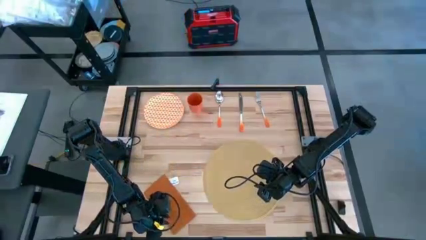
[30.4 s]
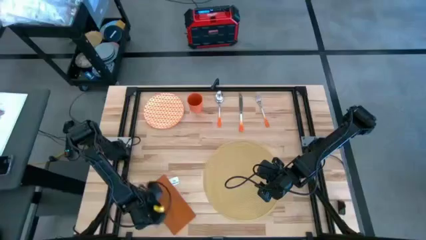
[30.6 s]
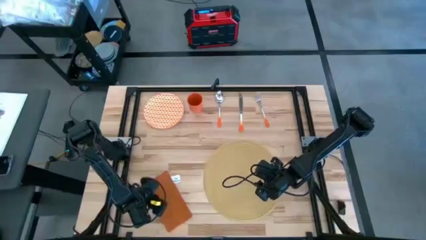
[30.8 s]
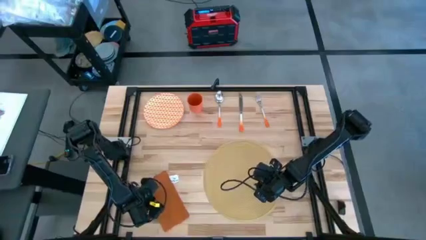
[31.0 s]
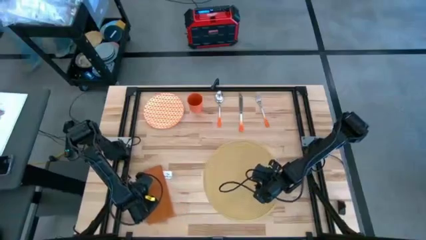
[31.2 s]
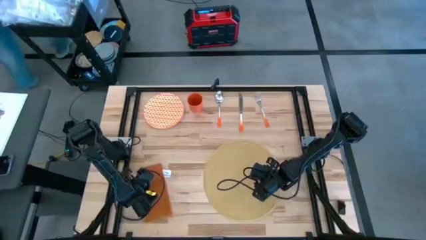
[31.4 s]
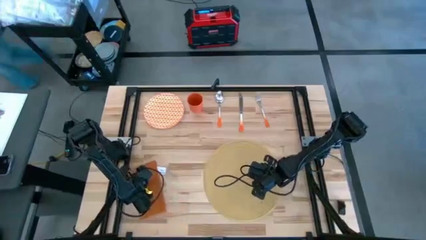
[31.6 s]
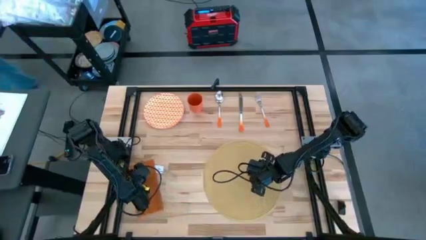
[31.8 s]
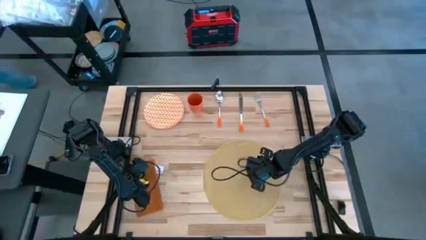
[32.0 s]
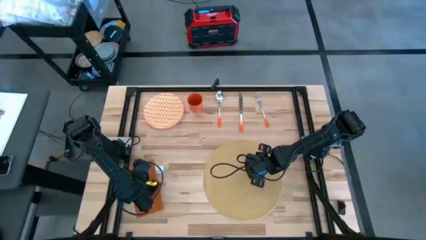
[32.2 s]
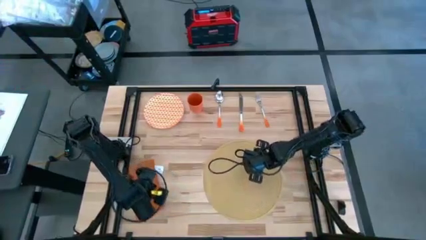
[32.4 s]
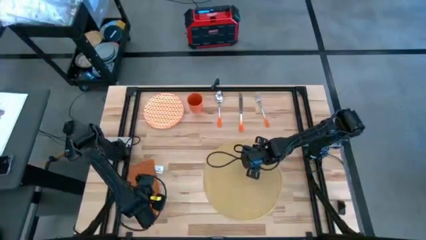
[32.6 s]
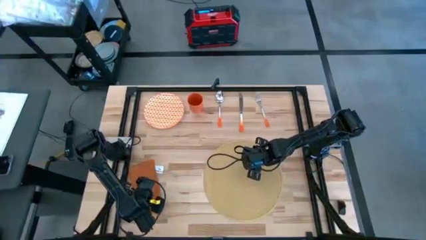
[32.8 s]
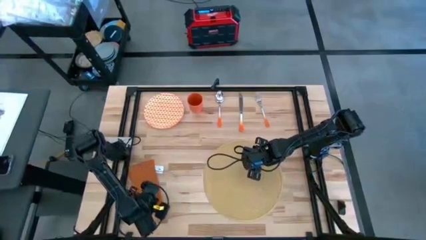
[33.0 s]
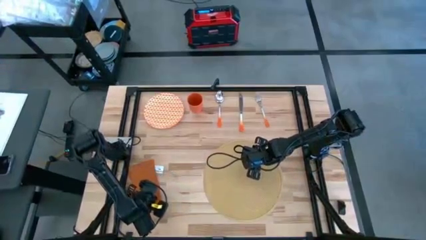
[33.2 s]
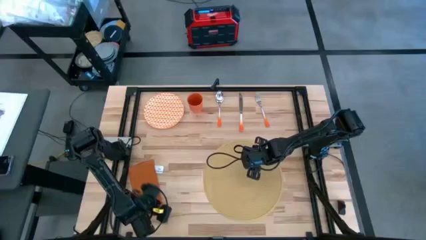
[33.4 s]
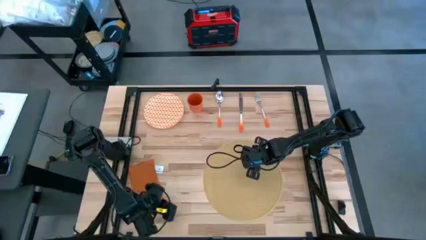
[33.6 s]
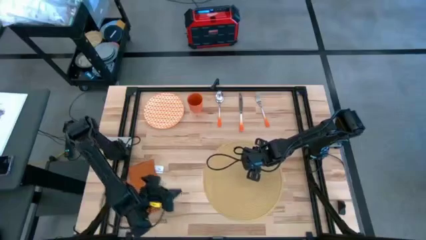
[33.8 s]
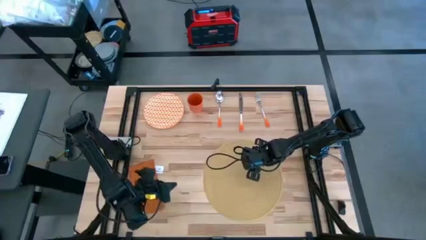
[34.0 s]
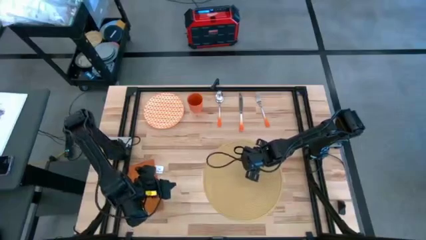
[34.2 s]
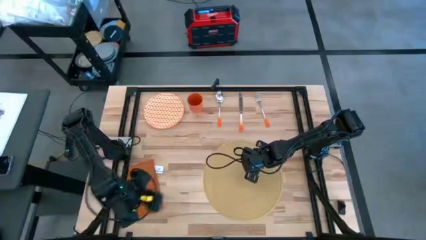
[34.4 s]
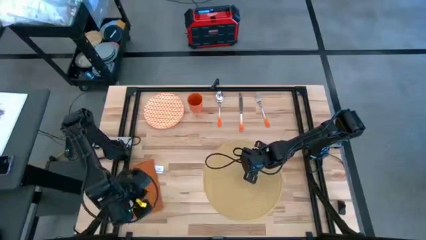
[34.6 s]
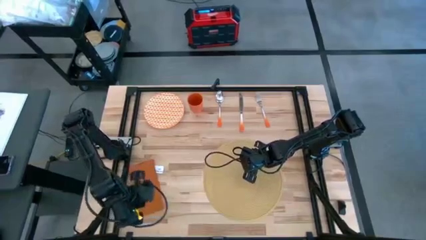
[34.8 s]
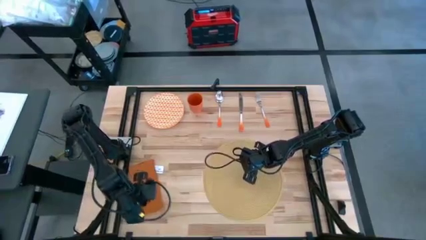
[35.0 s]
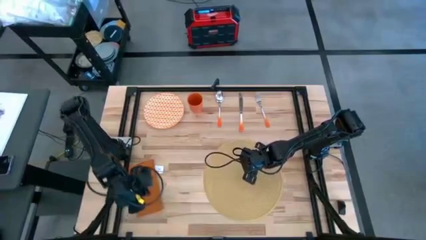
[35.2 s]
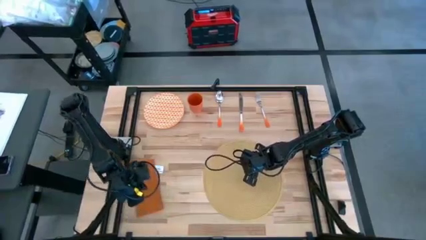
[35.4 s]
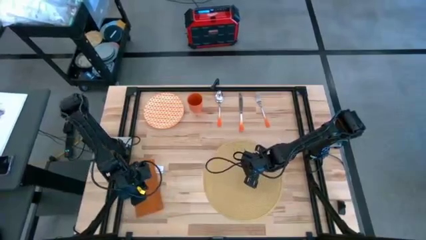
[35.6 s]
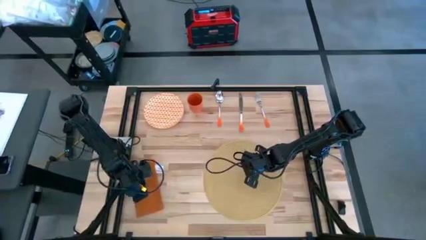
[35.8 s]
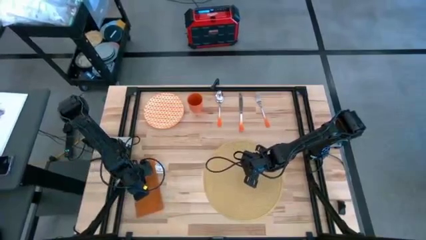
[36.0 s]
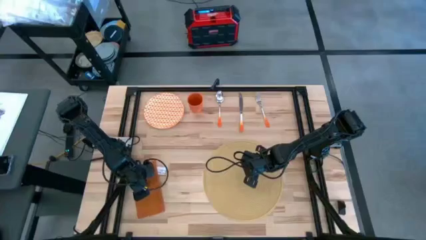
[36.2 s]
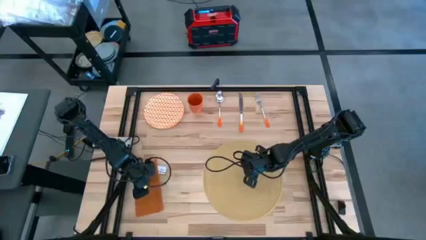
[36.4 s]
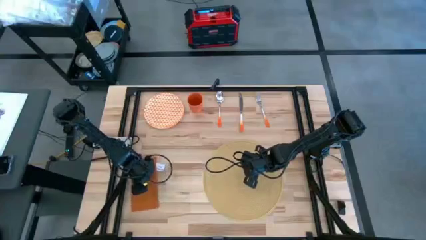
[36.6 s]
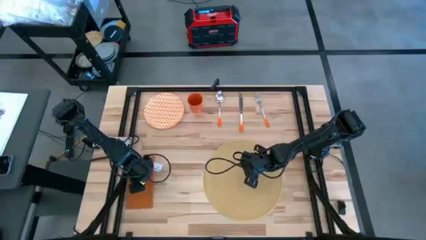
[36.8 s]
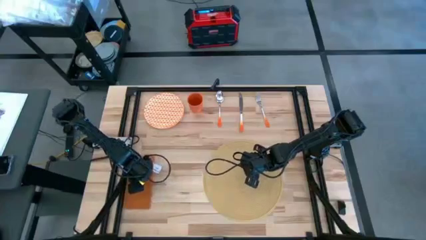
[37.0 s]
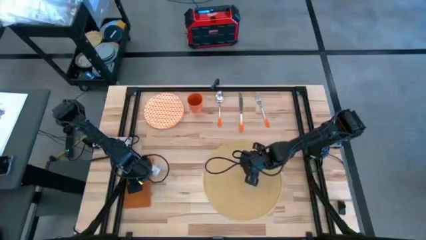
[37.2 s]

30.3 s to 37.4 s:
Task: Set table place
Move the orange table napkin to left of the table

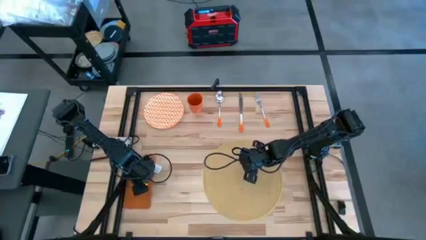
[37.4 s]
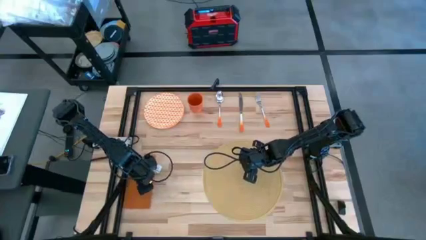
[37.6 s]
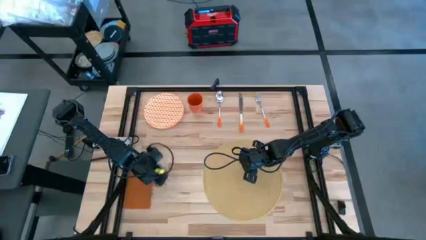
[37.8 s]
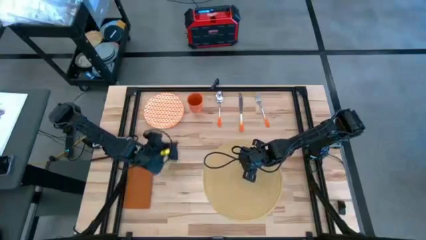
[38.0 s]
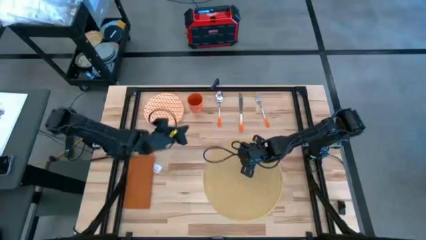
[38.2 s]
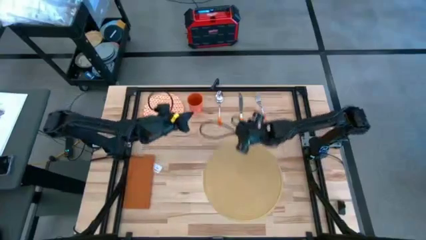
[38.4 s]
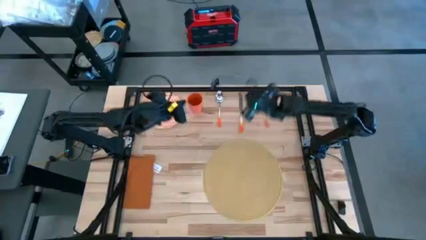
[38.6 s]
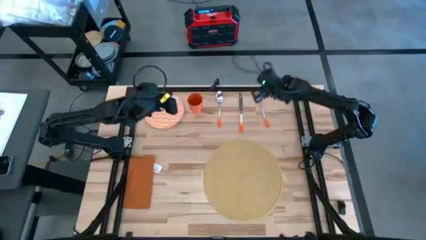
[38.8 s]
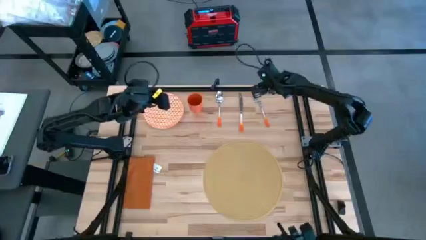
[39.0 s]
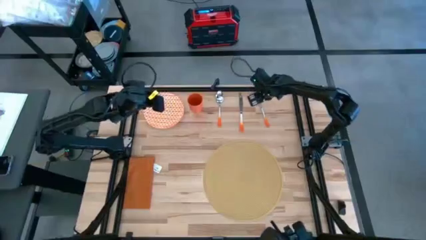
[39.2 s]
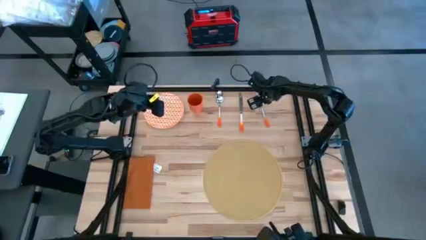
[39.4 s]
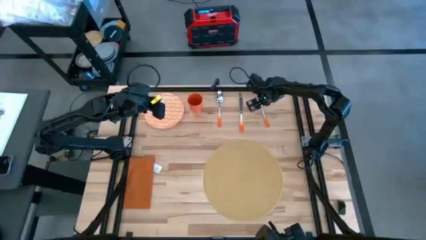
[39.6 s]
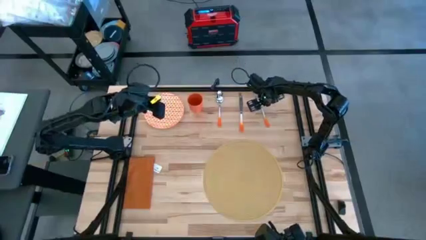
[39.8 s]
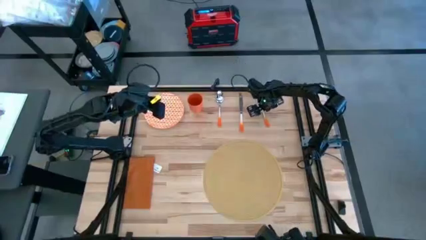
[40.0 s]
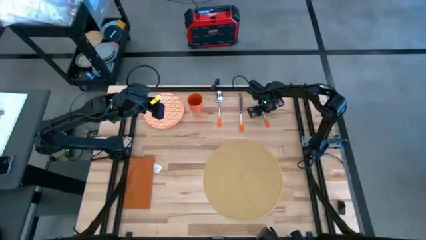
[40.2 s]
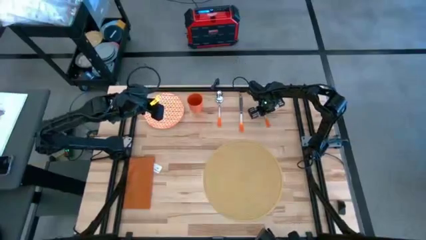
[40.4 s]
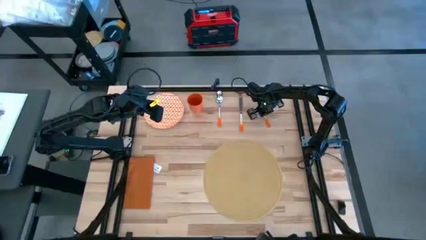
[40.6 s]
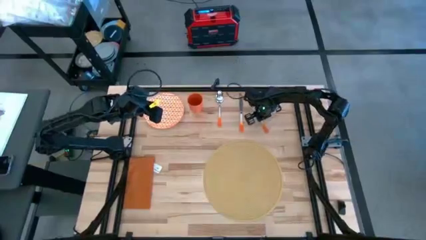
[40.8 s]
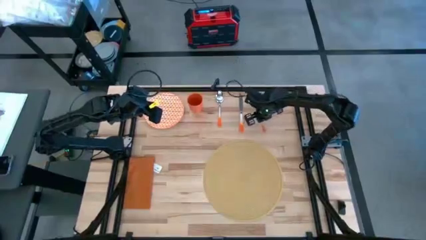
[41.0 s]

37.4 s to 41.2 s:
Put the orange fork on the orange table napkin
